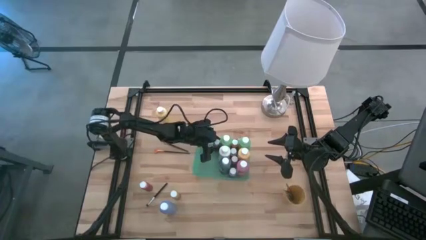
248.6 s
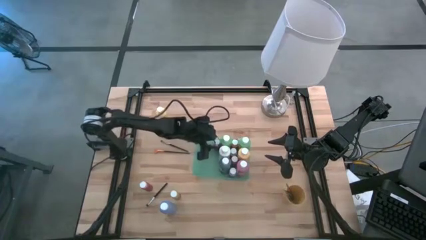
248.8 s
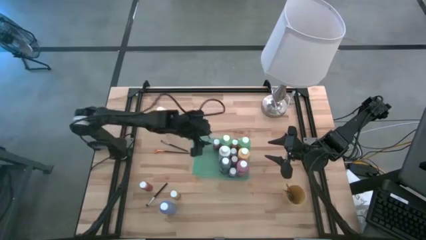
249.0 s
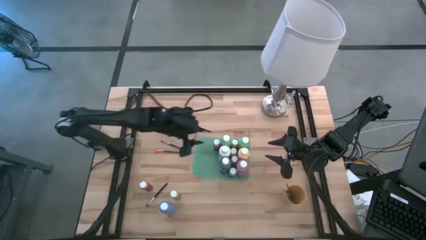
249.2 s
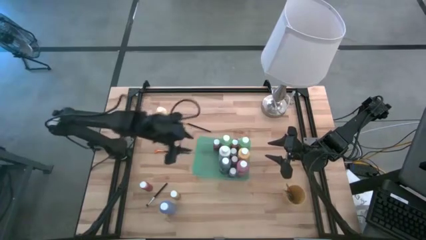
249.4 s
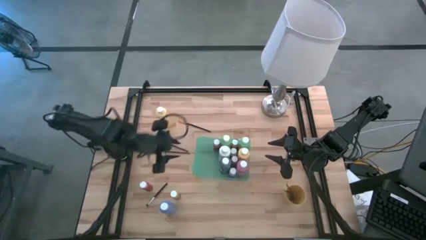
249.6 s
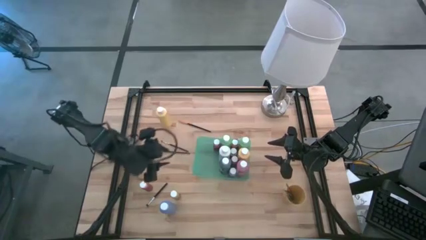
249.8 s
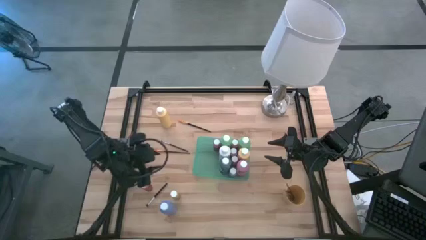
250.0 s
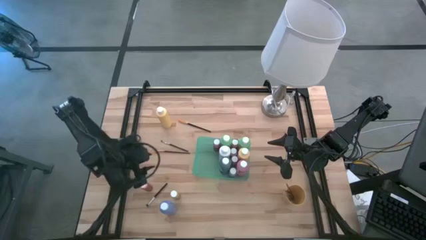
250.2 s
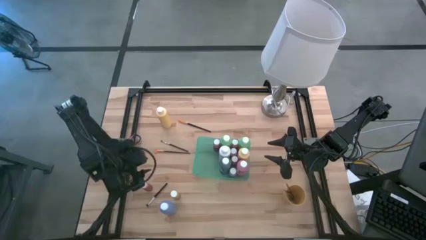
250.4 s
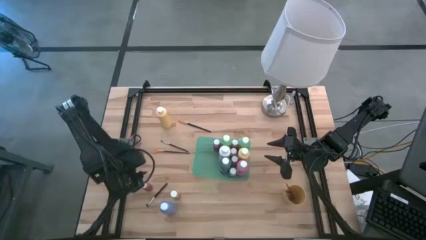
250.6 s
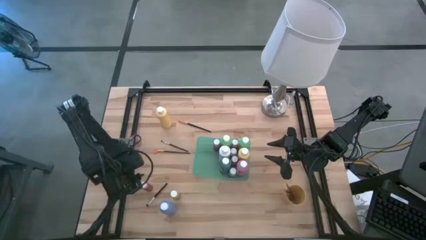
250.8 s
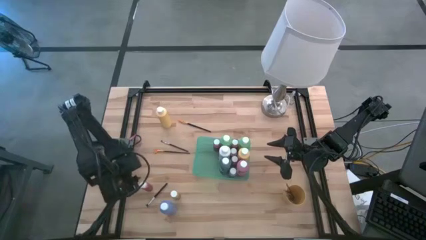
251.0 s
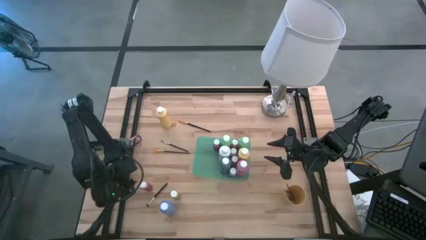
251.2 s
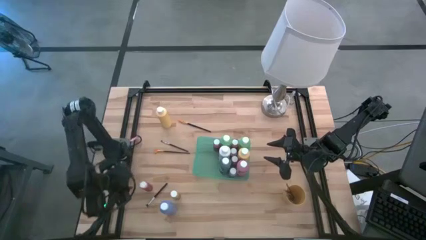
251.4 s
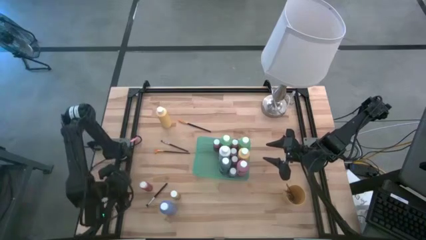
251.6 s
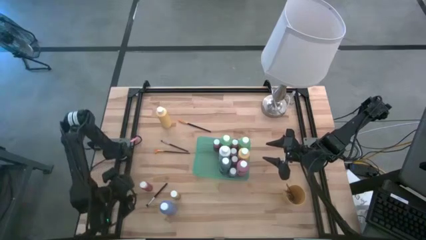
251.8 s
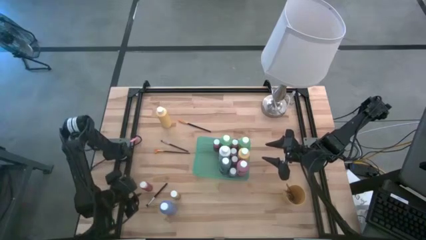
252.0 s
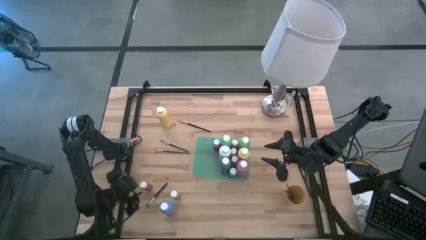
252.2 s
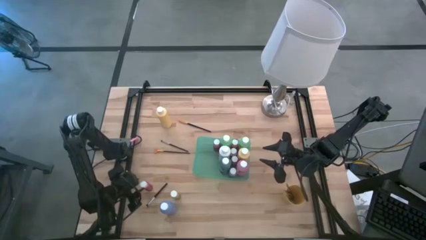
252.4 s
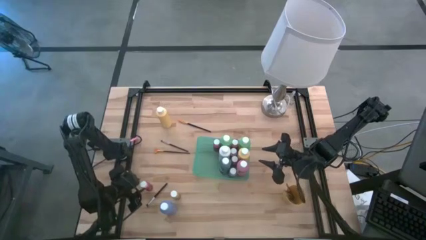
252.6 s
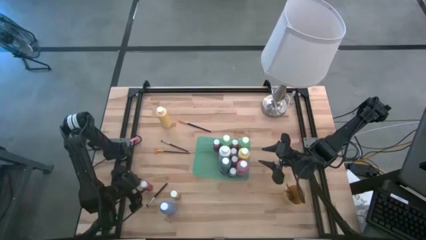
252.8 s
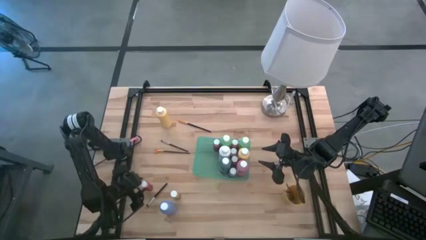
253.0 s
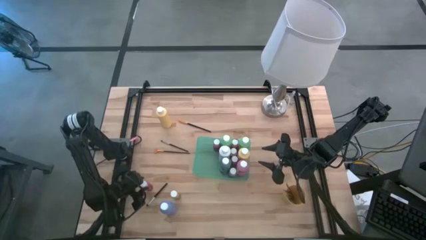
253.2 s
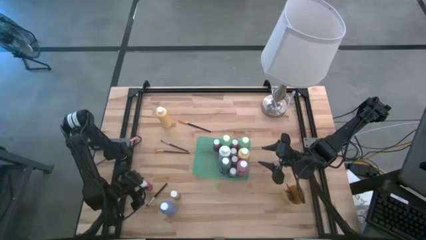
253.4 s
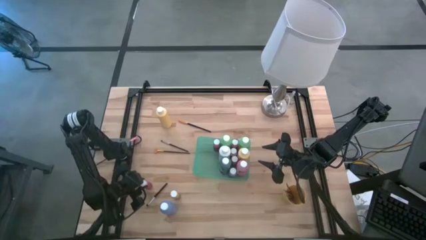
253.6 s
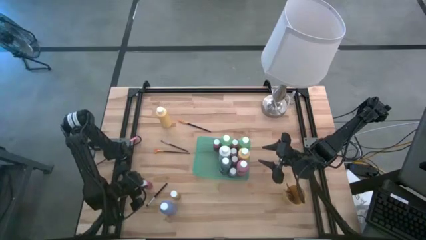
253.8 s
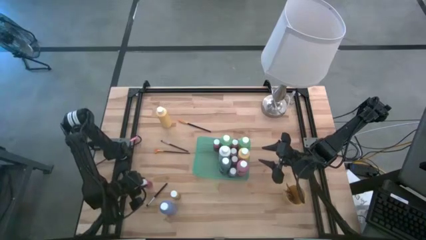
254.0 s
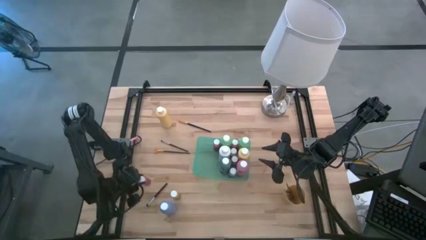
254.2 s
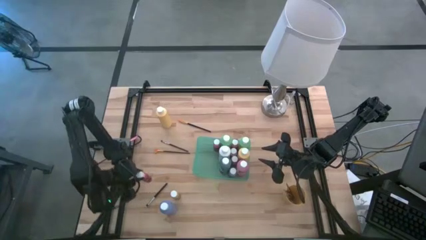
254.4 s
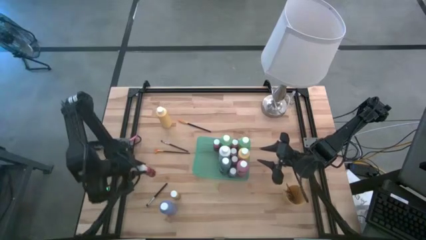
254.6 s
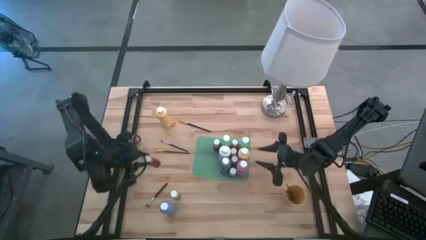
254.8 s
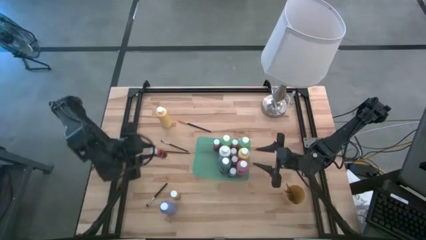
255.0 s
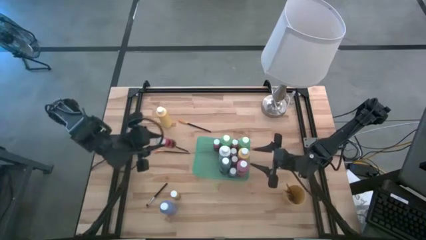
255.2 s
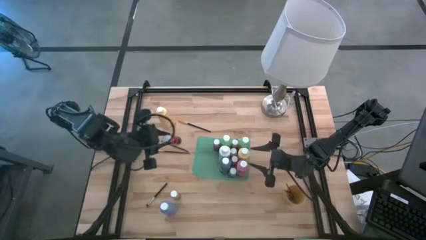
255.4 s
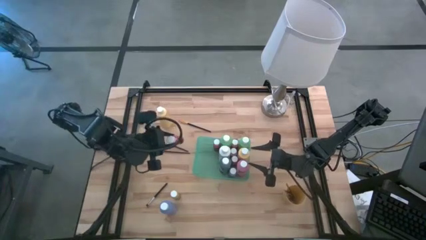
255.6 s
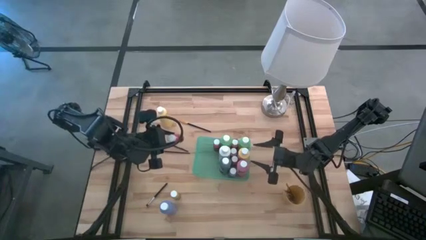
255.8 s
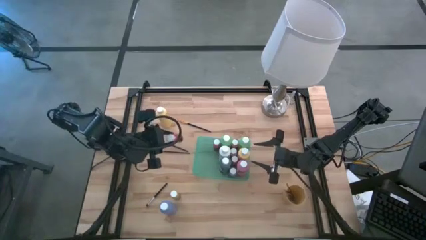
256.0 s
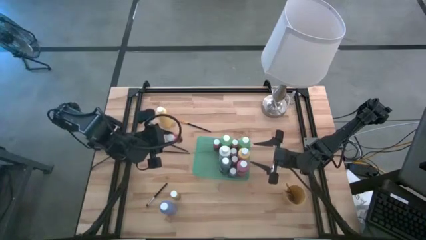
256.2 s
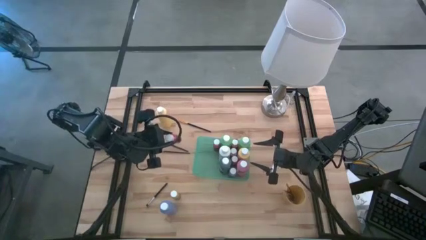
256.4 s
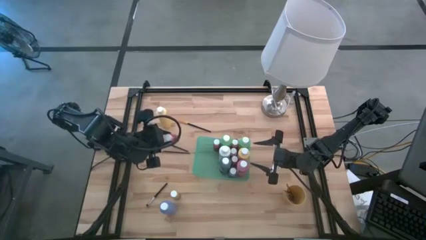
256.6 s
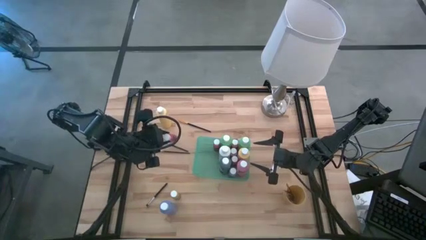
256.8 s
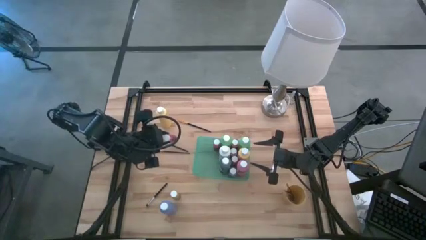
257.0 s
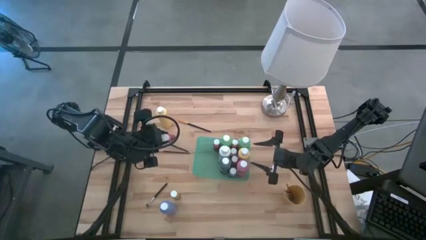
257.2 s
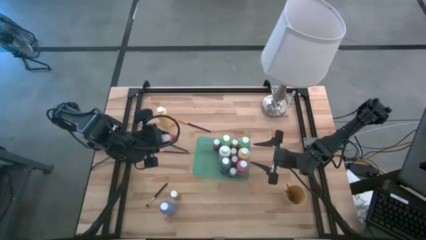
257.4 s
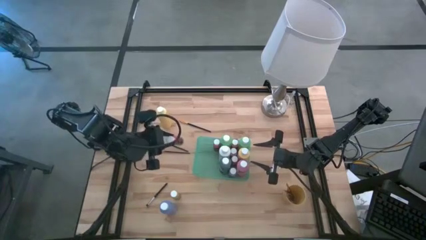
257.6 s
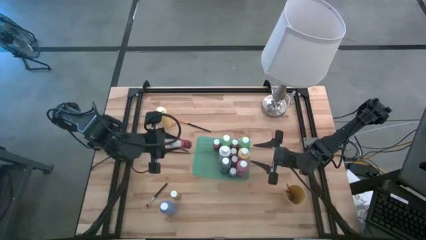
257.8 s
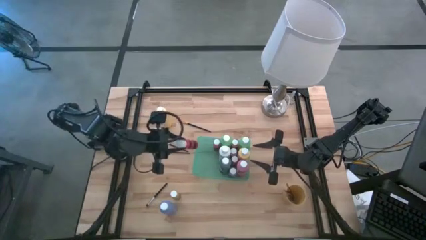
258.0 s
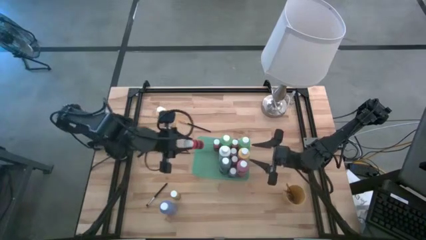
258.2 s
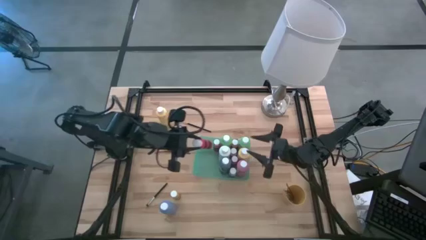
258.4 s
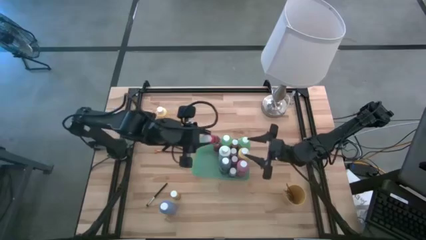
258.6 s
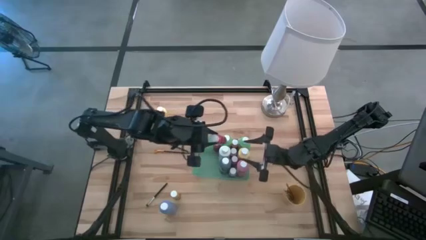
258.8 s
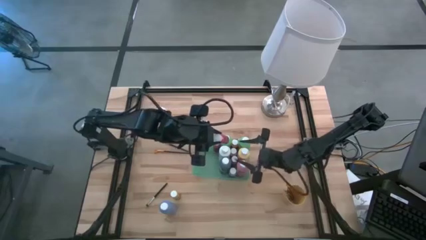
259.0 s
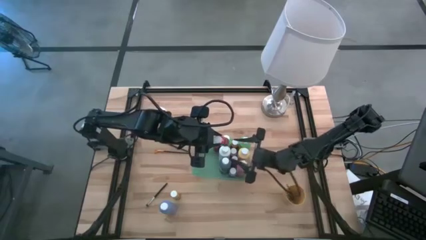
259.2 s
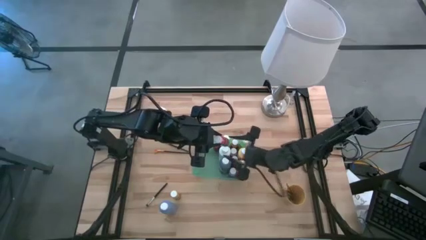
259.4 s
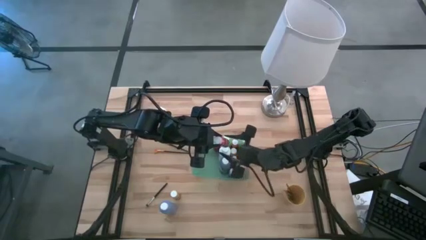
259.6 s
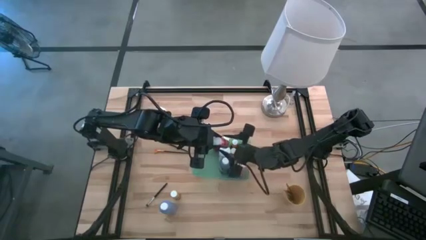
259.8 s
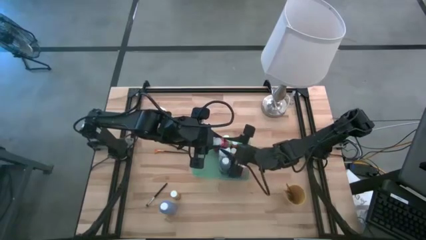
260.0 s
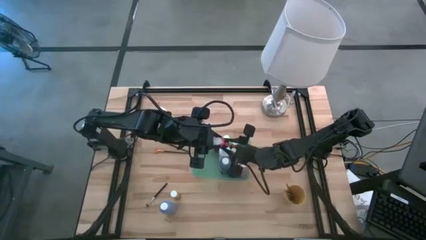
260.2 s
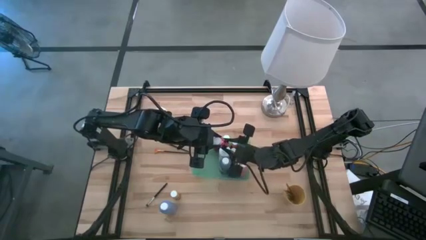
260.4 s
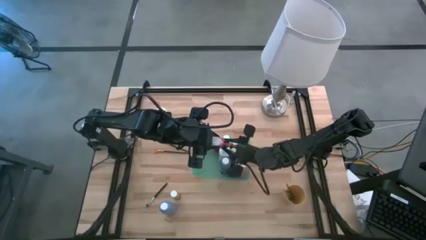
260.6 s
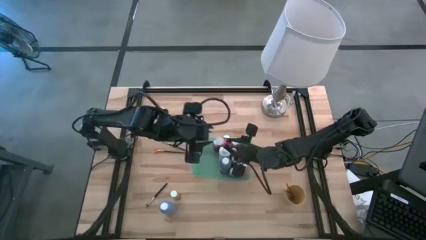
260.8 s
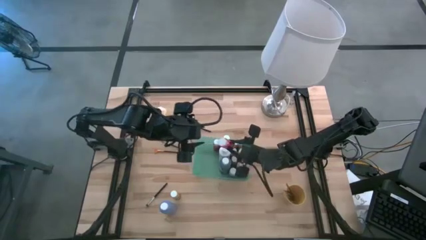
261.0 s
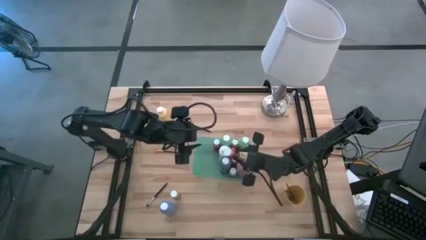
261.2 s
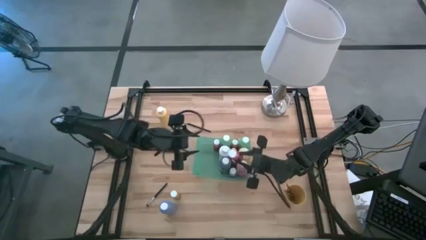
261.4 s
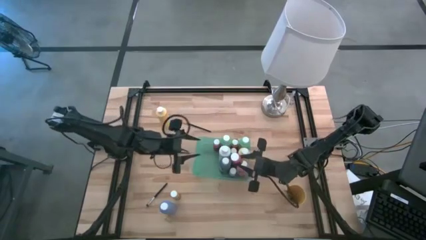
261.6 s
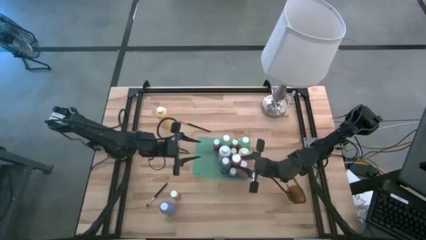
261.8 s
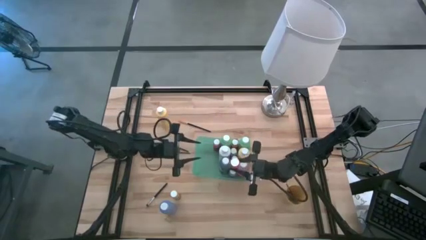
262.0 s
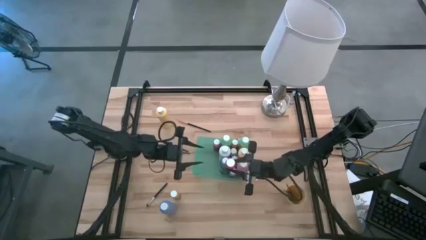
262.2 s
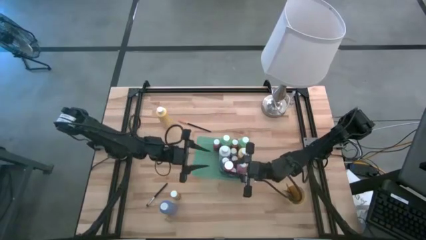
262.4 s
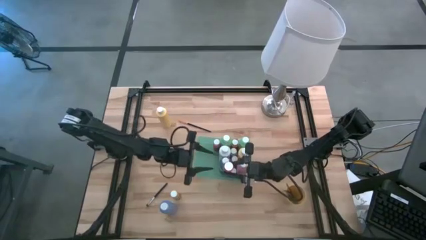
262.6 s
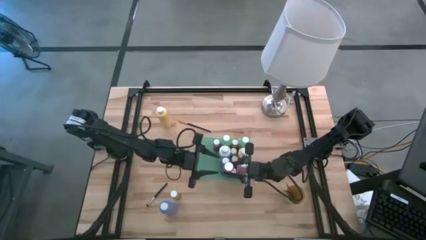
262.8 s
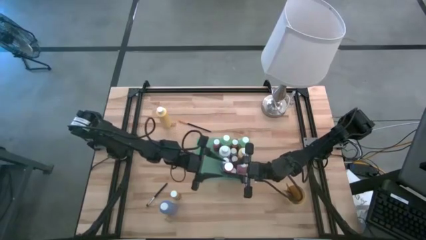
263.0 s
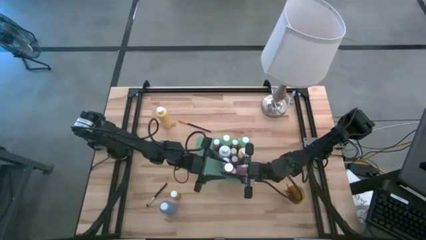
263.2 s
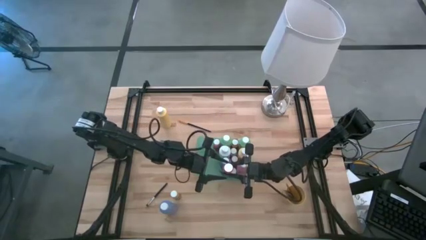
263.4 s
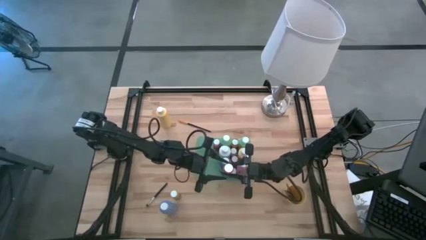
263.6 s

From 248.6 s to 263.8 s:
Task: Pick & Place Paint Supplies
Put the red paint bottle into the green bin
